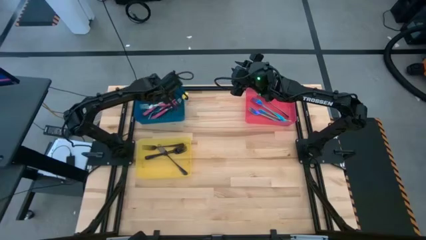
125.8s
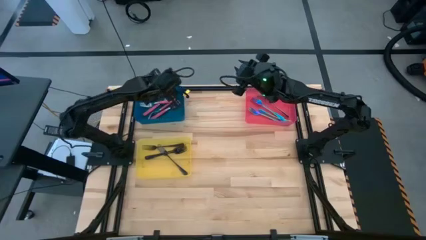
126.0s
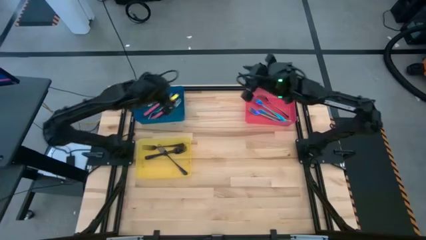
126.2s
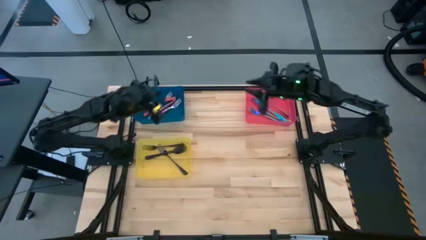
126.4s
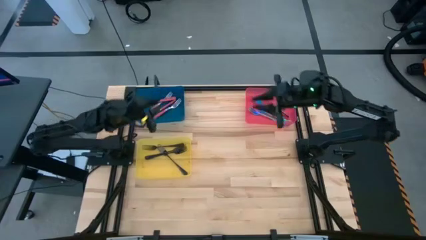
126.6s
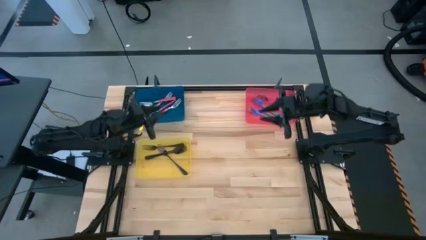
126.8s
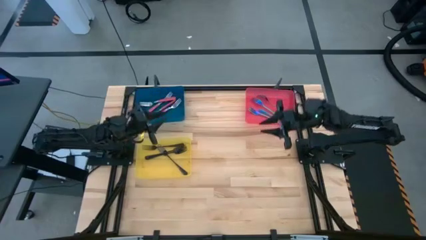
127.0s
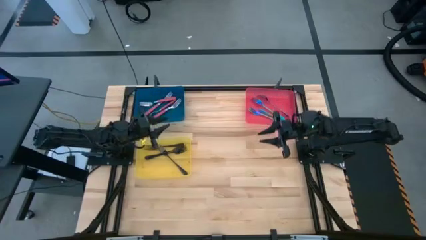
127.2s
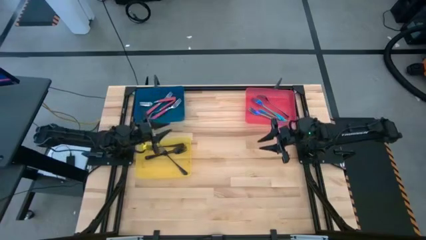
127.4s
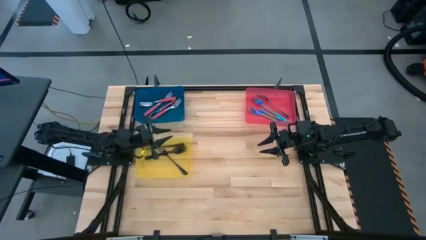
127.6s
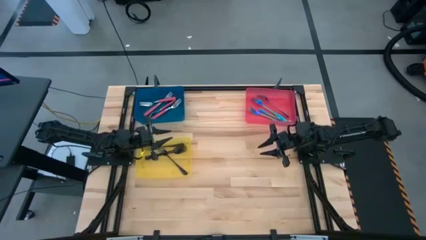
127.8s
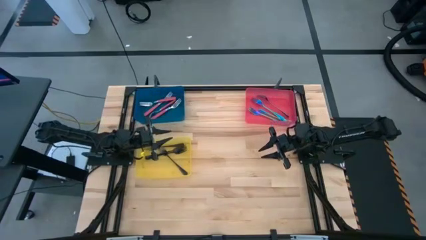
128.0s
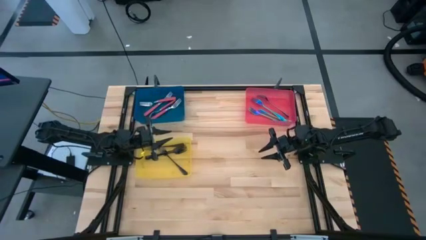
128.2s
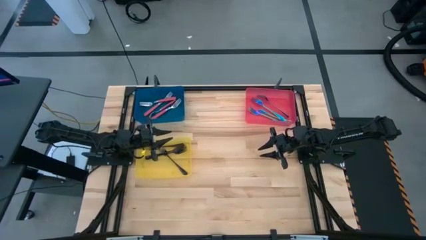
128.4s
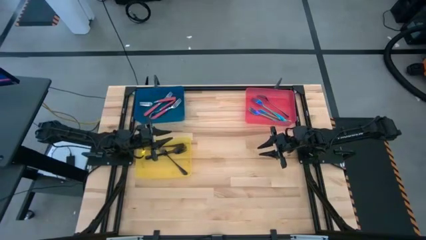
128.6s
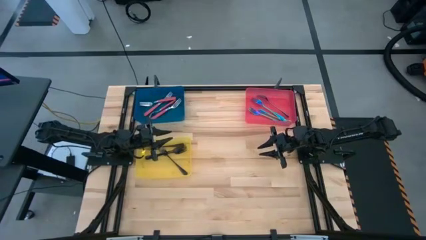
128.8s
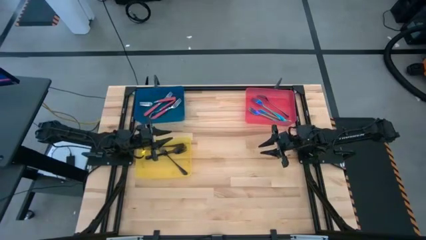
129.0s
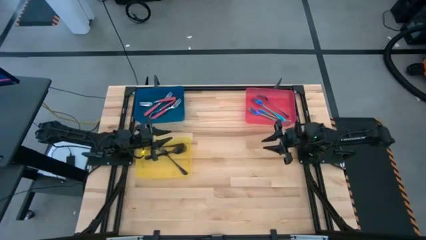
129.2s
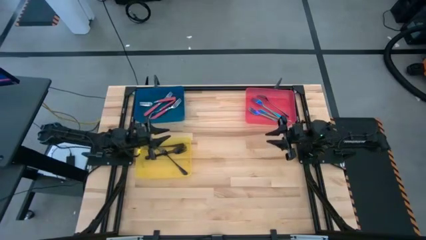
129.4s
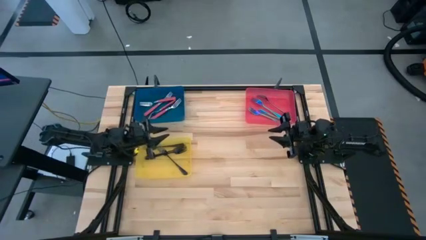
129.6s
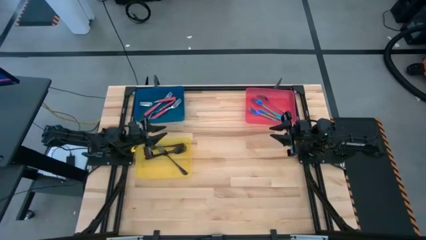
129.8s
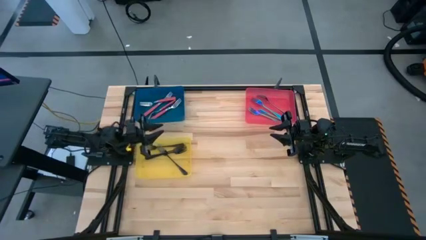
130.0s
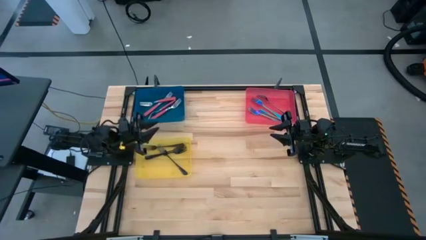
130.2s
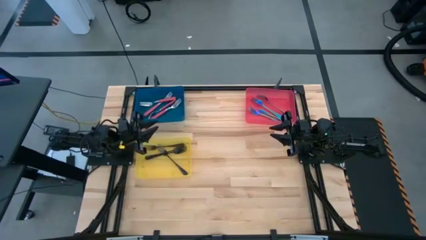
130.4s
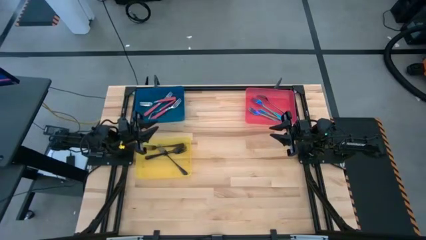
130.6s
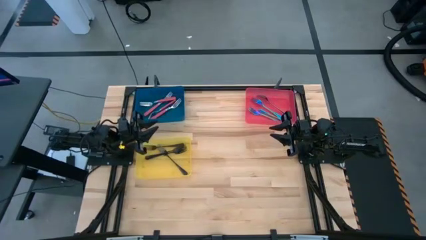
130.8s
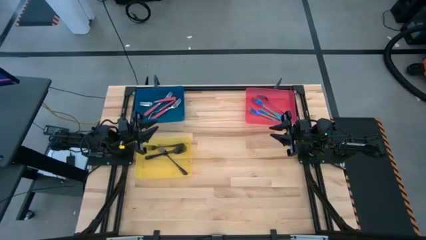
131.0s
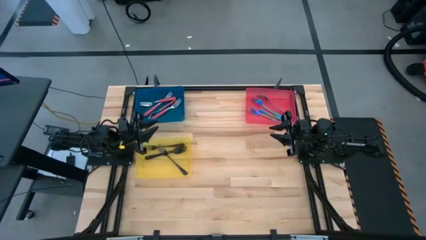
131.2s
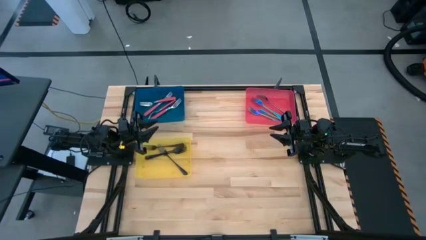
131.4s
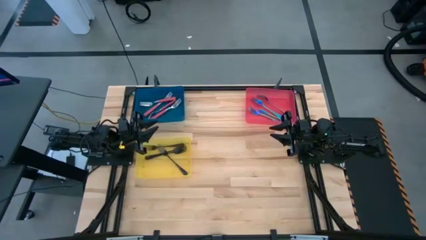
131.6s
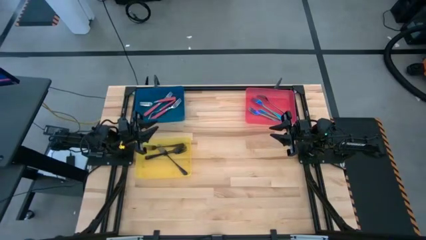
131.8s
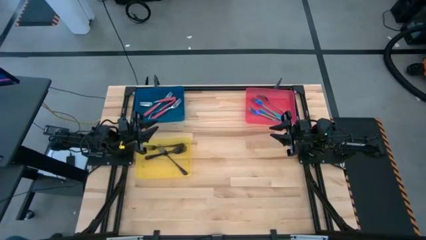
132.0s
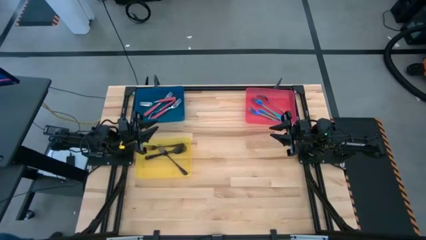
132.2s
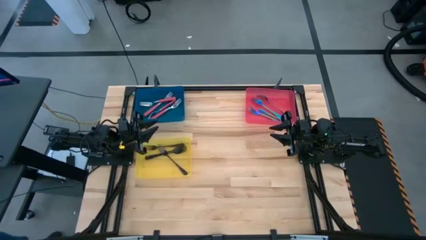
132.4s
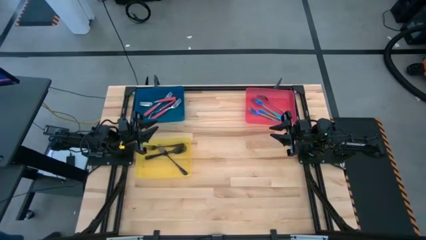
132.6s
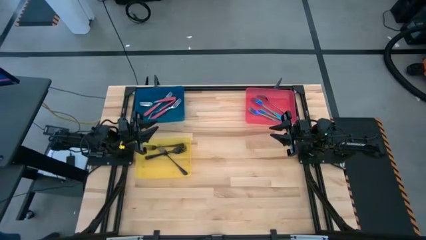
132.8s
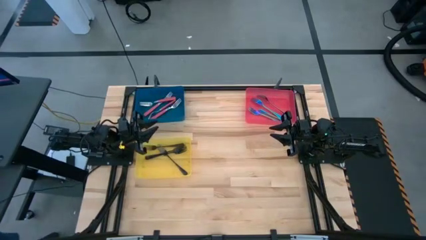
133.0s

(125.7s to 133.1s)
Task: Sort silverware by color (type)
Return to Home Position

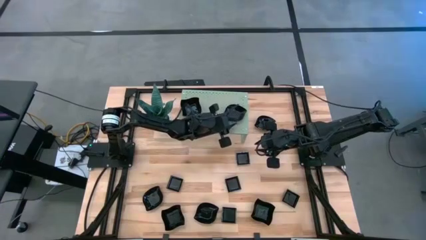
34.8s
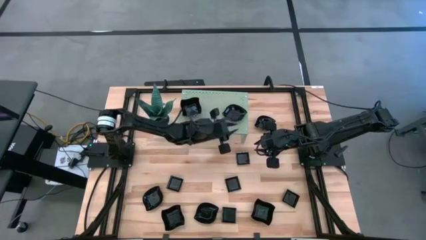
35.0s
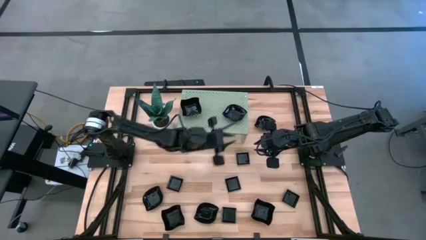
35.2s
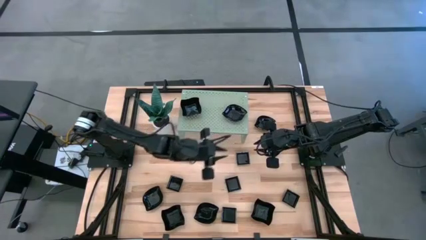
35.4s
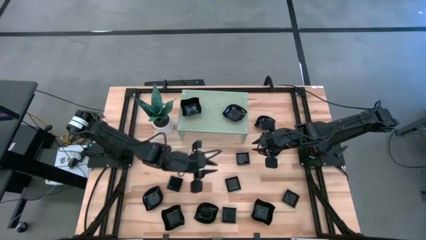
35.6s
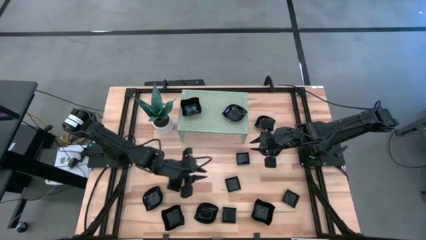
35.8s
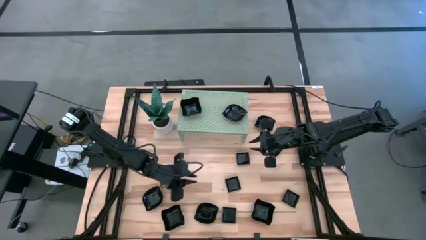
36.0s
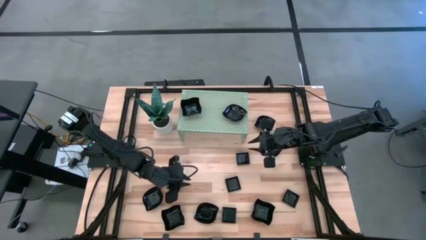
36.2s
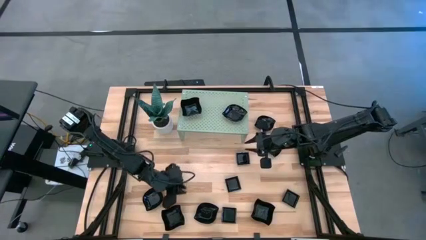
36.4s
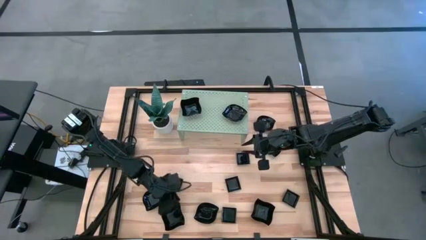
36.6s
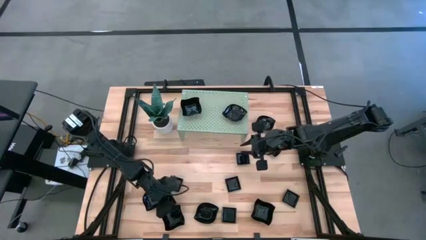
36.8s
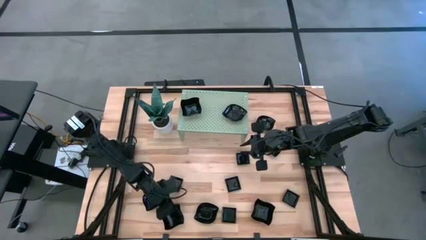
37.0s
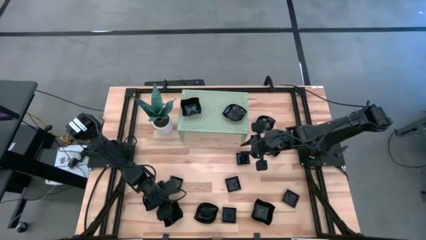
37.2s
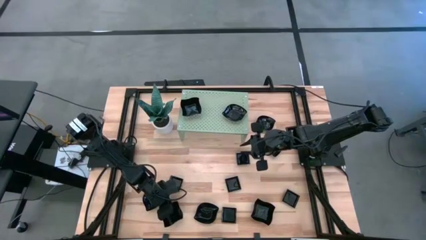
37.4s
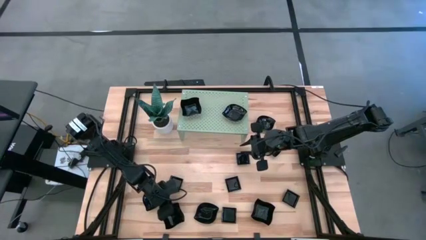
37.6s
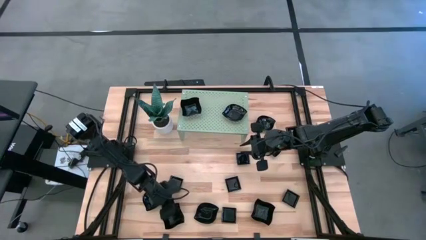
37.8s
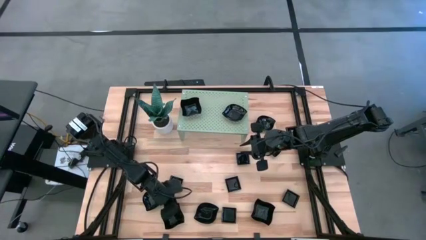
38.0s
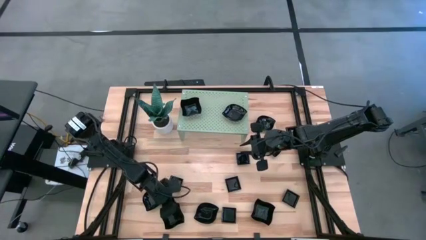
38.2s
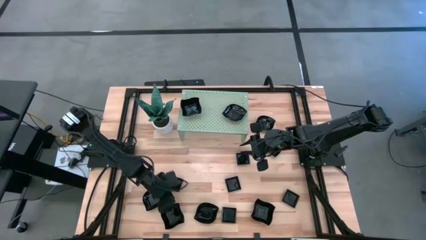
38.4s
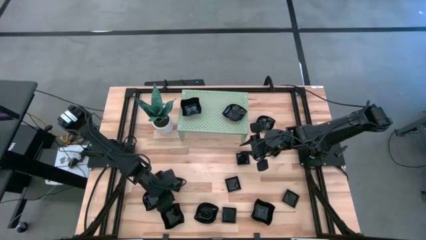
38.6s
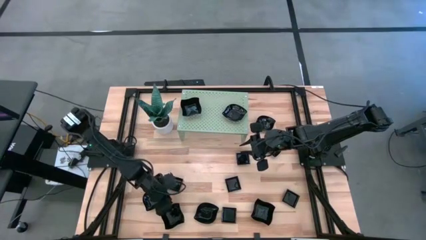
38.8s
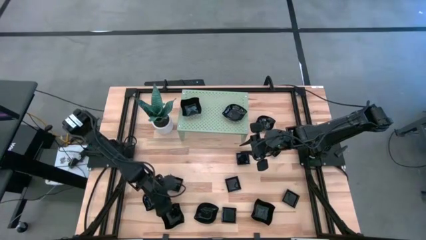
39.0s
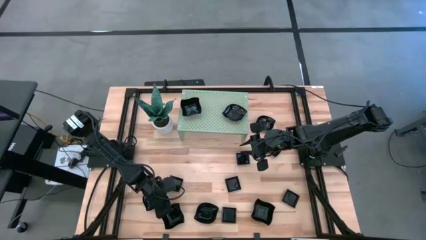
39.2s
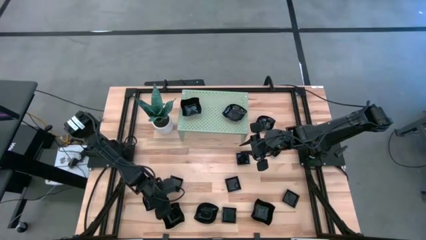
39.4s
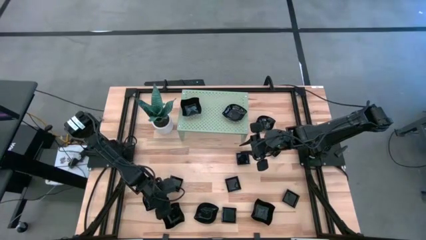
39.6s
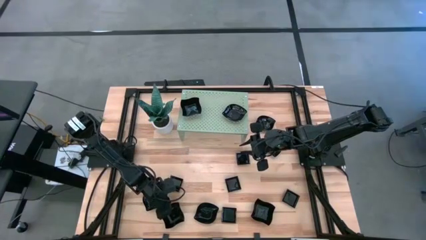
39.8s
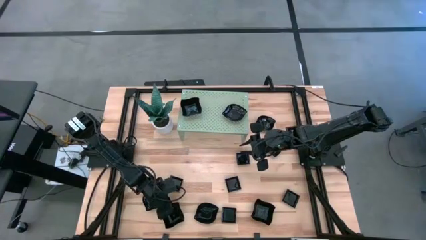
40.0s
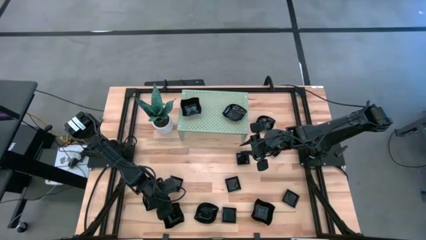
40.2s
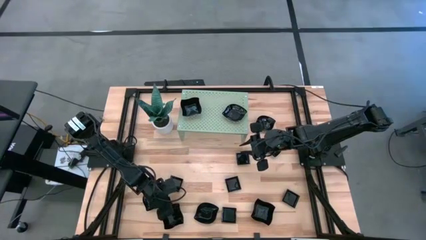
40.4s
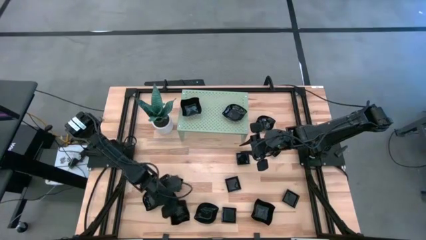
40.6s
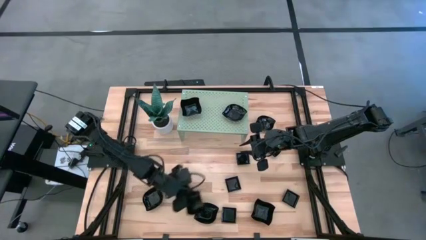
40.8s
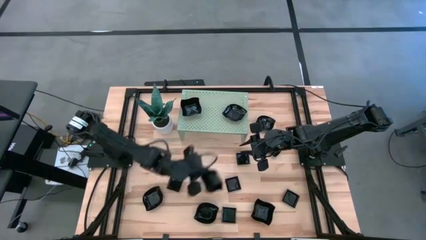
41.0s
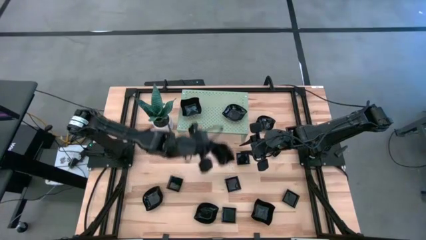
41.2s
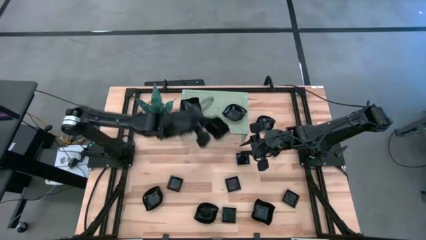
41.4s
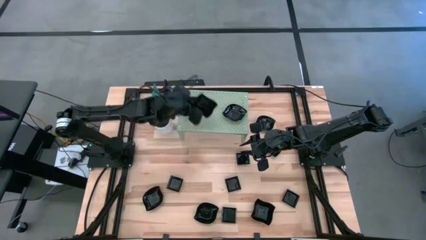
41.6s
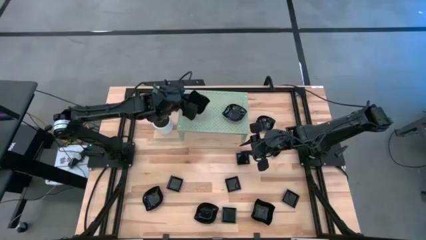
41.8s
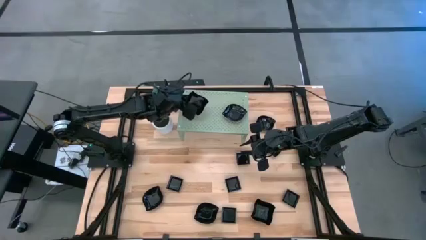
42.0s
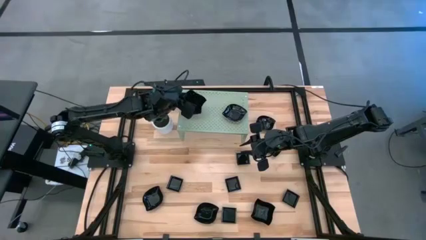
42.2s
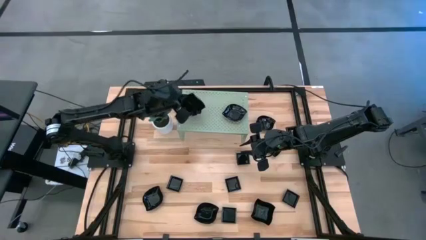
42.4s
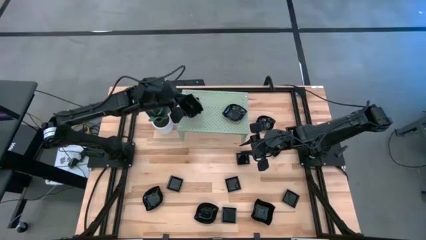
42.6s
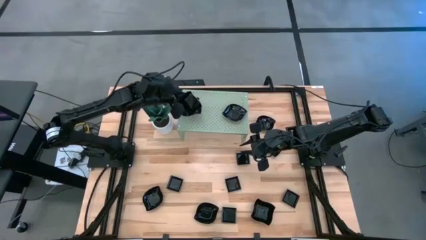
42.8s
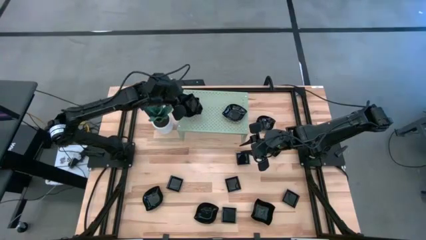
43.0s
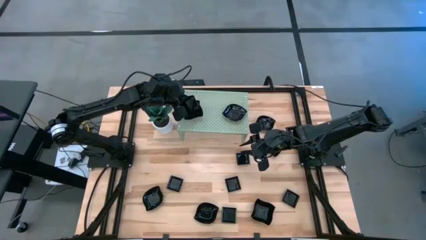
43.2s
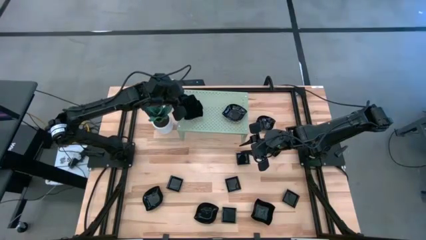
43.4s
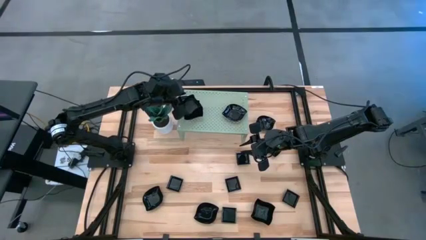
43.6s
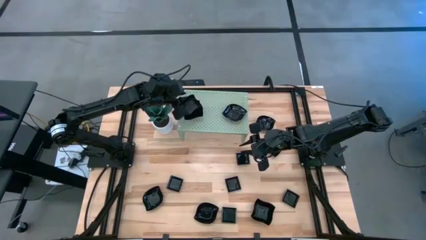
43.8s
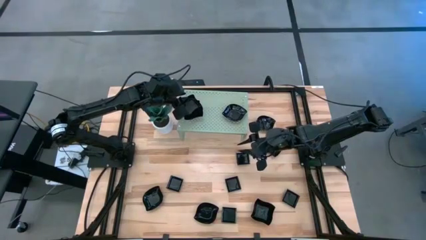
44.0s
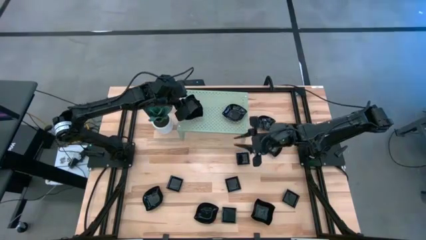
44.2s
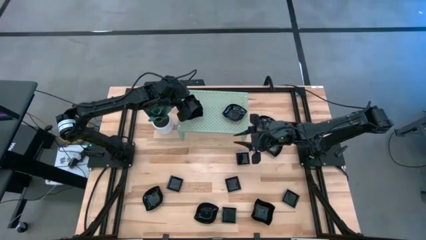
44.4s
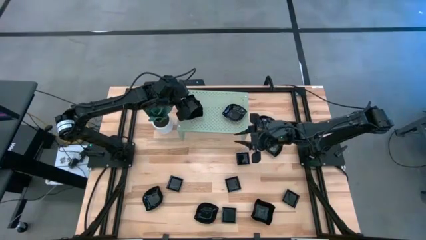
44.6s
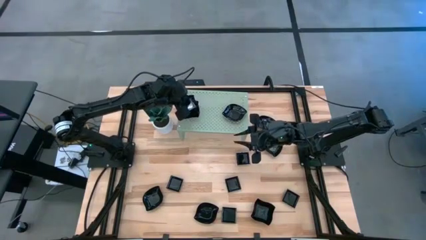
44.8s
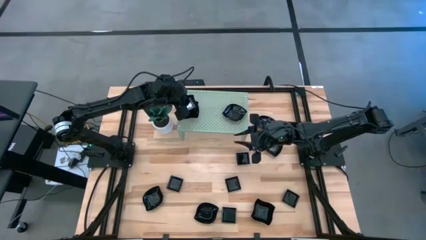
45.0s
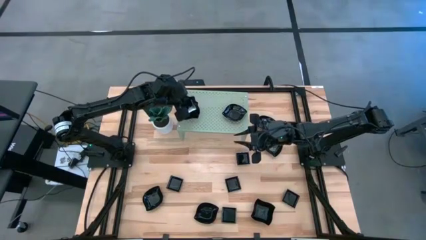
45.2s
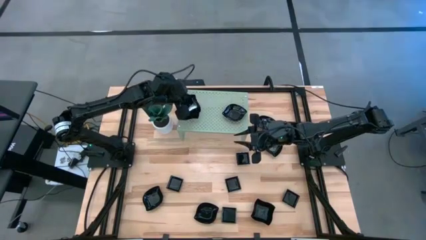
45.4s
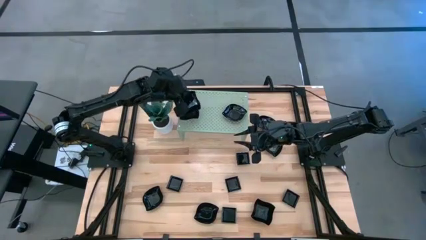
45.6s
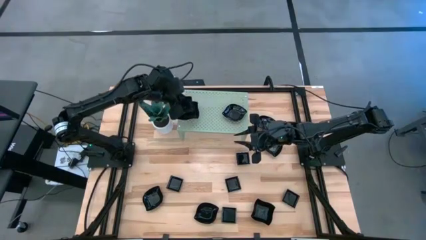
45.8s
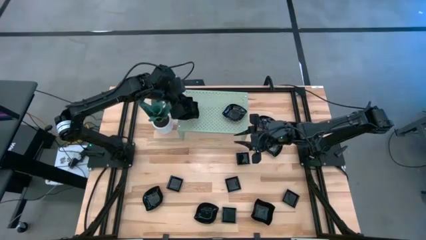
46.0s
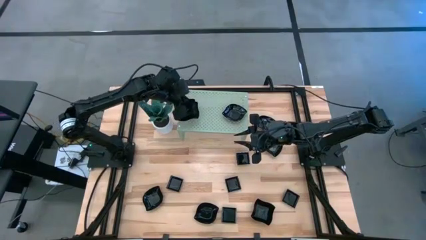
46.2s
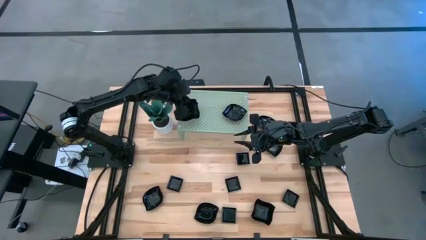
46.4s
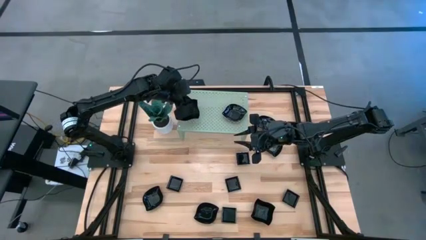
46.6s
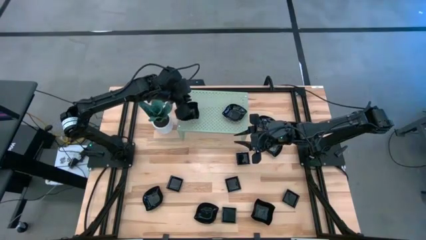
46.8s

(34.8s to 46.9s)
Task: Pick & Place Mini shaped plates
Stack the distorted square plate on top of the other distorted square plate on the shelf
